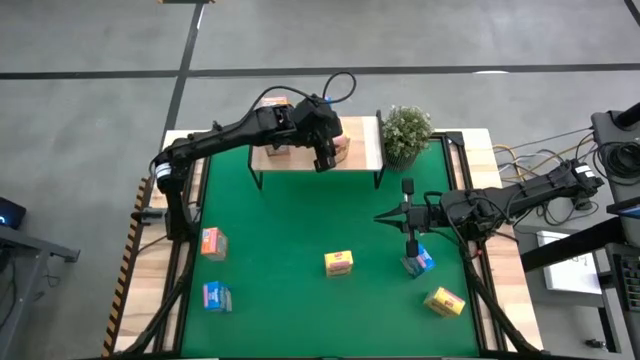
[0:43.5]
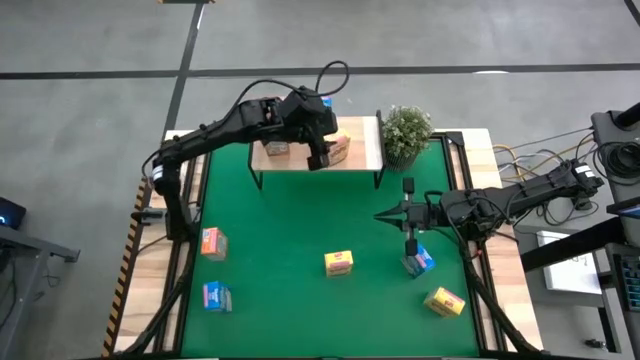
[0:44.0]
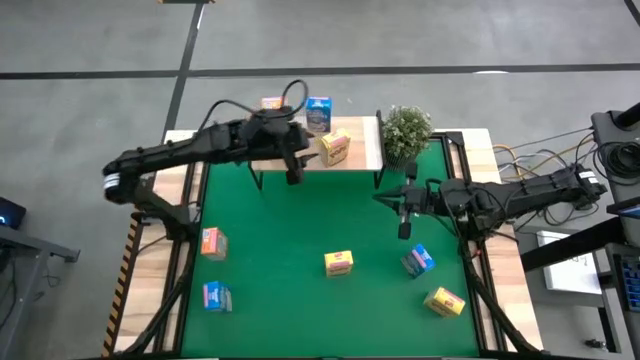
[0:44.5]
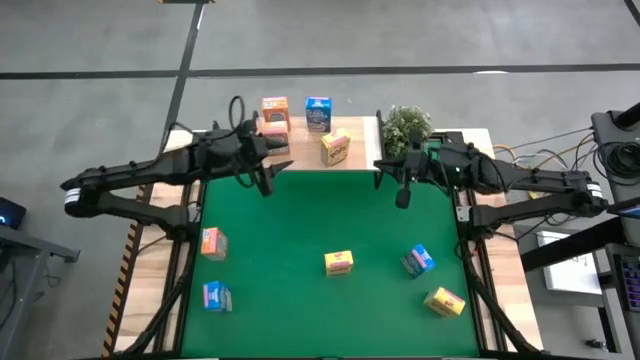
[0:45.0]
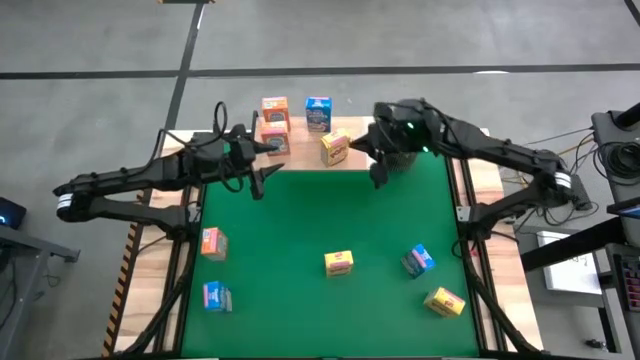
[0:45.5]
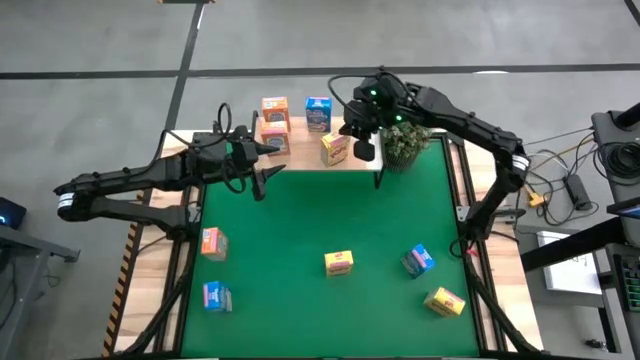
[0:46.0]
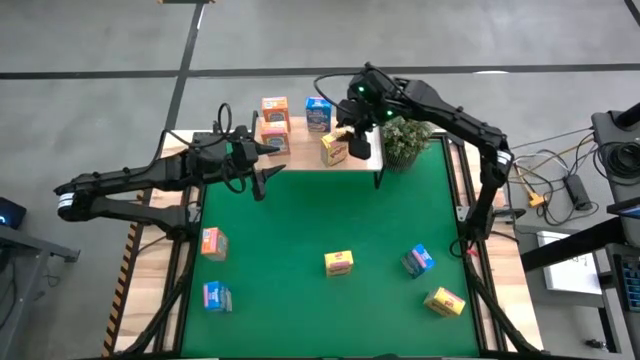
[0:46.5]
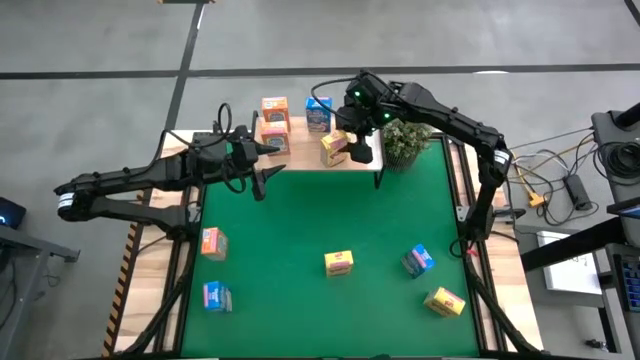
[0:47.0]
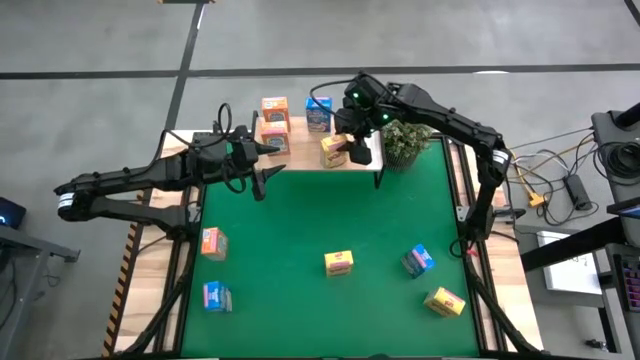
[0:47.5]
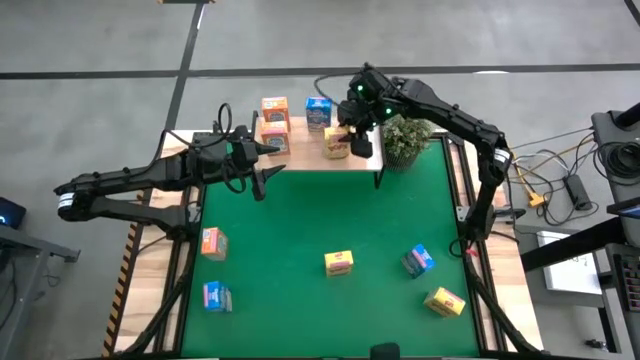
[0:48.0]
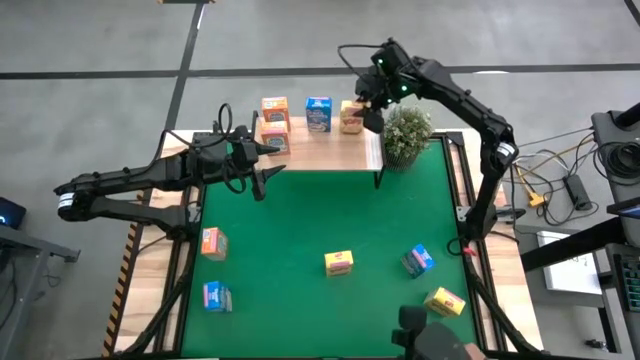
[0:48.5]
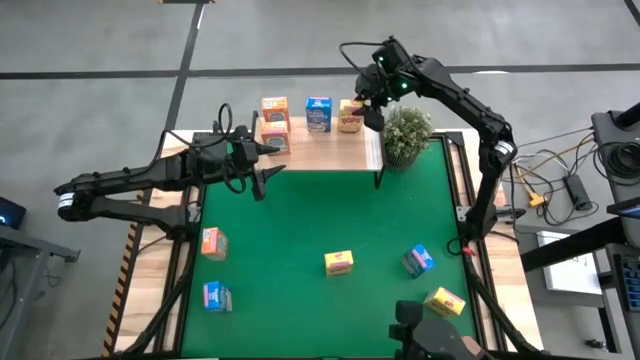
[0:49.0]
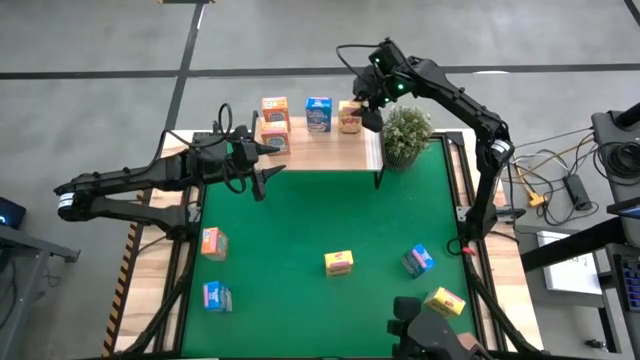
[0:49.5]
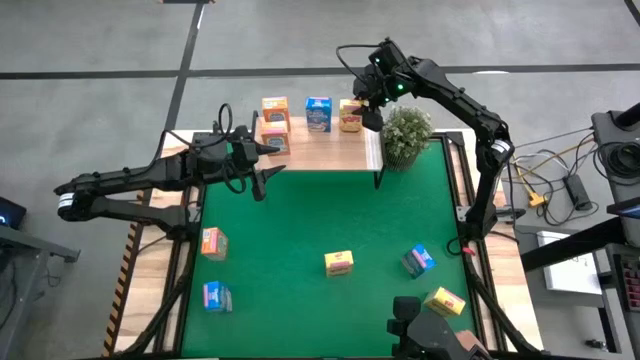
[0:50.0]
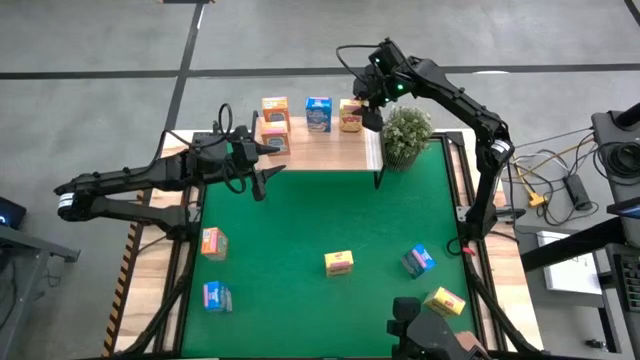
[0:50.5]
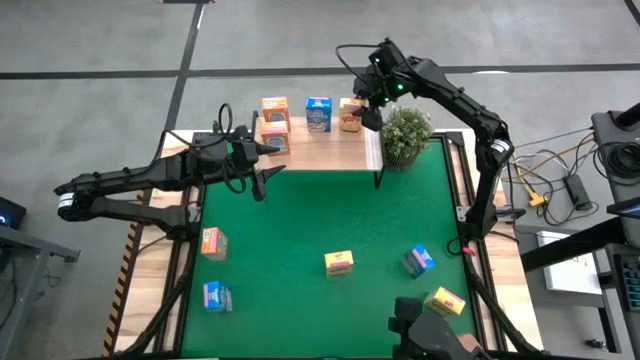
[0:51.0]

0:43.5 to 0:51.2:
Task: Stack cereal on shelf
Adjust the yellow cereal box on the shelf

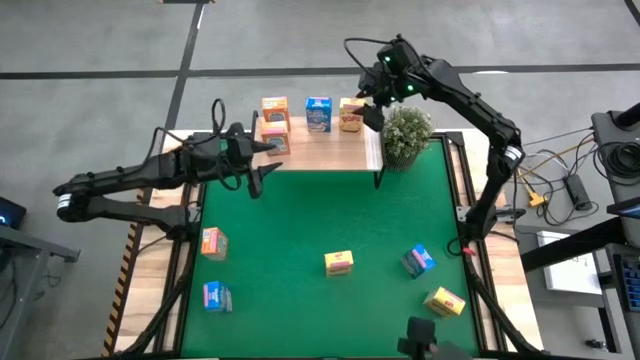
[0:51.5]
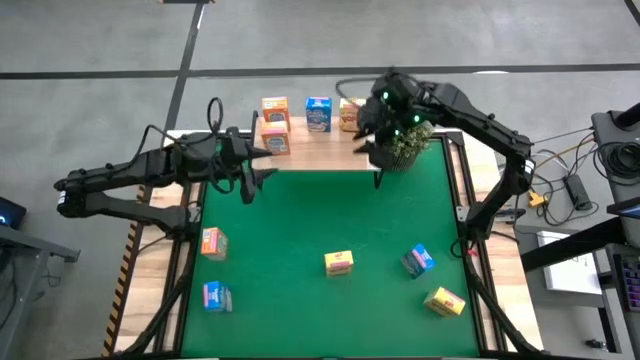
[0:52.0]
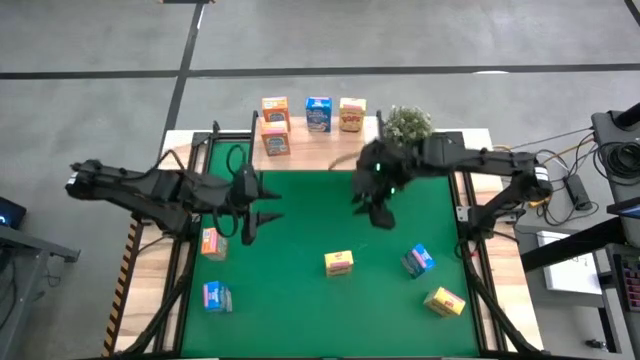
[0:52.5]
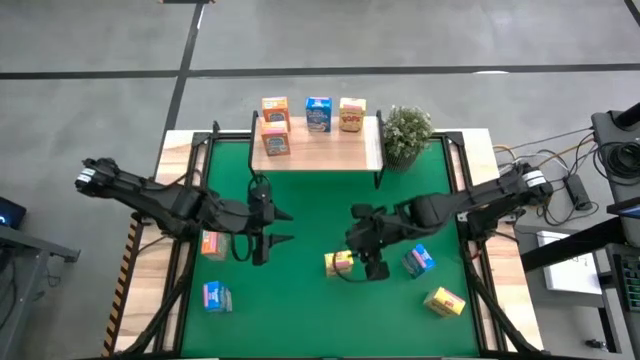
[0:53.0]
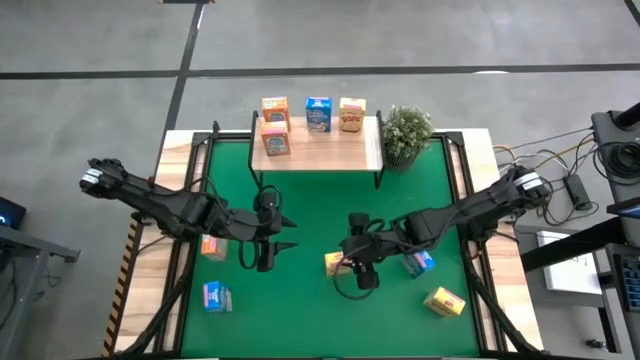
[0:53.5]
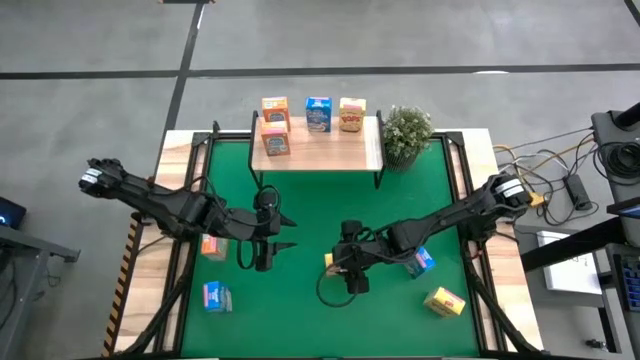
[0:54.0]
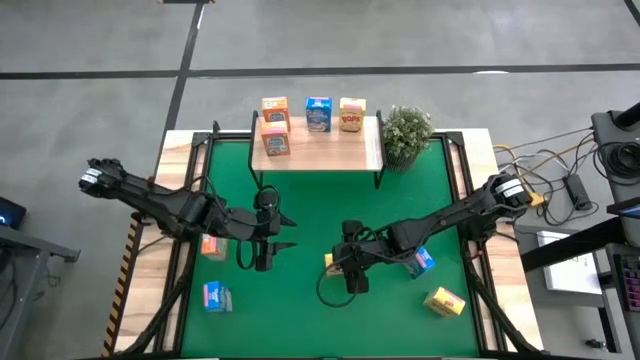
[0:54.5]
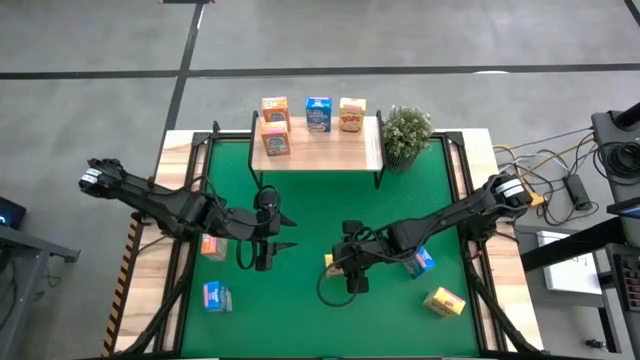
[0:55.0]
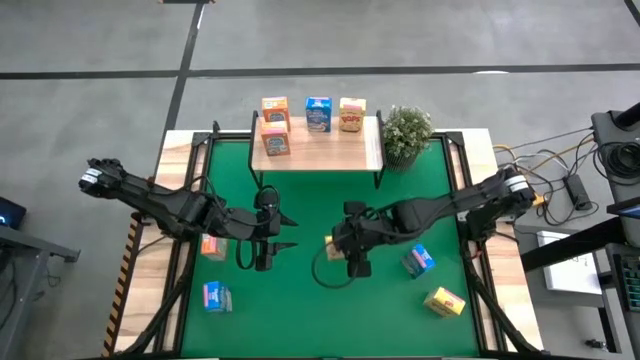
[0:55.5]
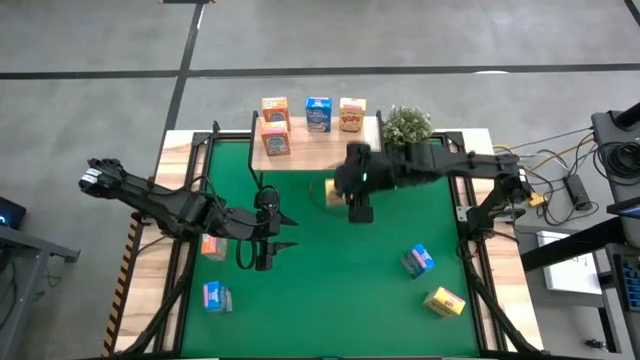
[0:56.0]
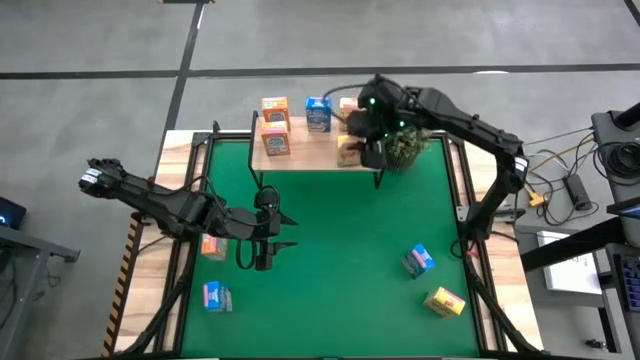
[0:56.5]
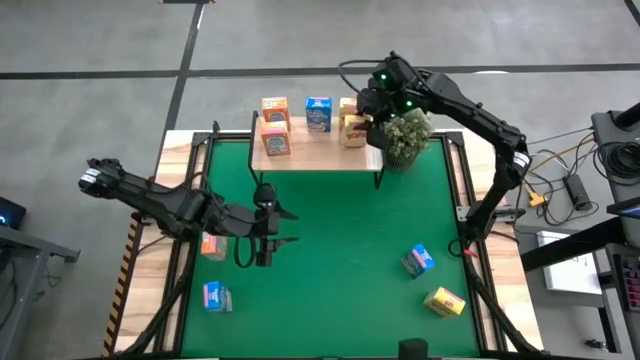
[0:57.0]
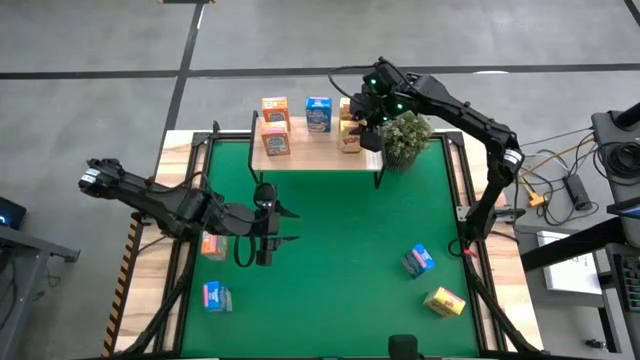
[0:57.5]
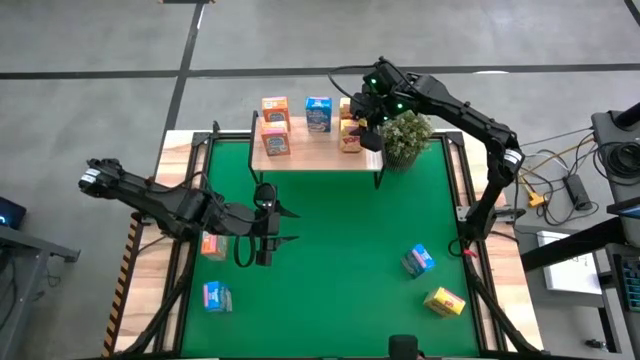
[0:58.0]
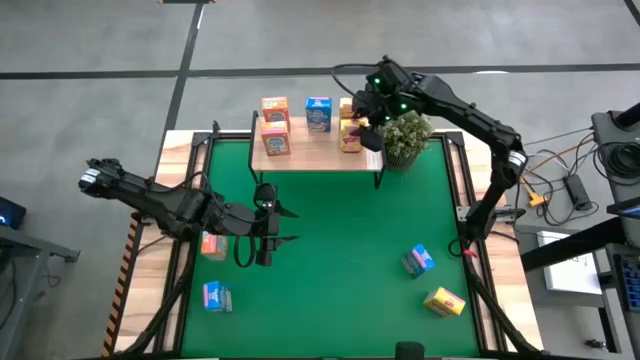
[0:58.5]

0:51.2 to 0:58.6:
Put the left yellow cereal box on the shelf

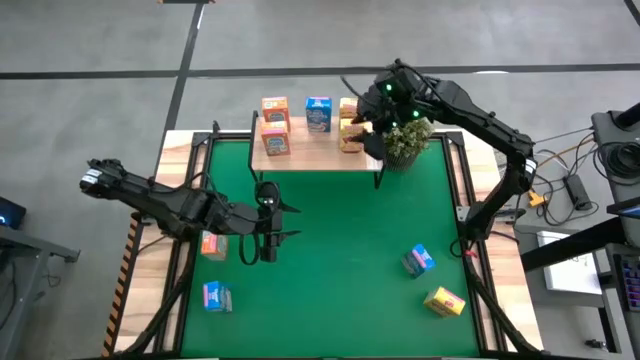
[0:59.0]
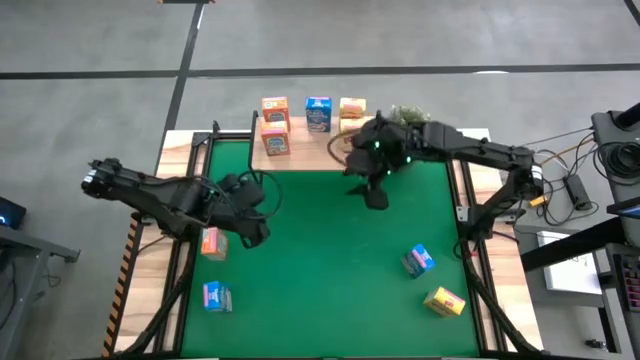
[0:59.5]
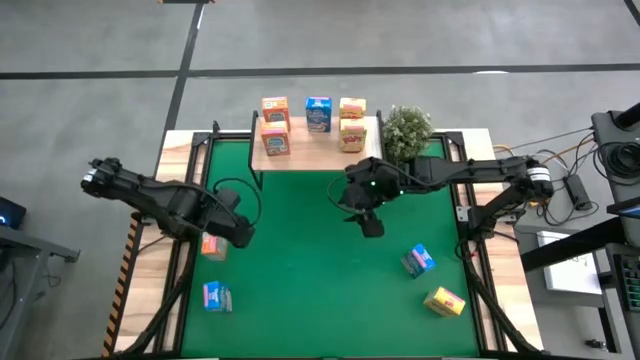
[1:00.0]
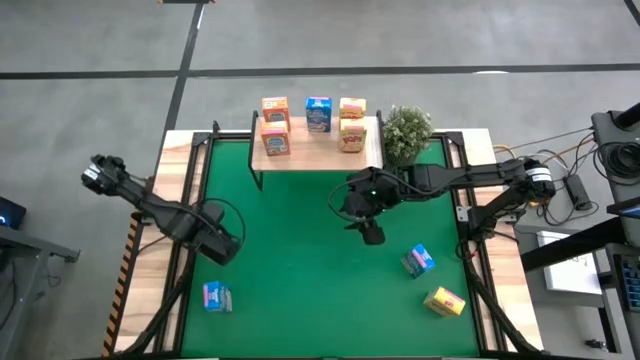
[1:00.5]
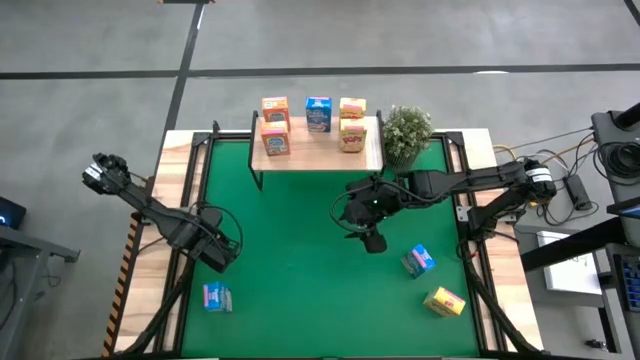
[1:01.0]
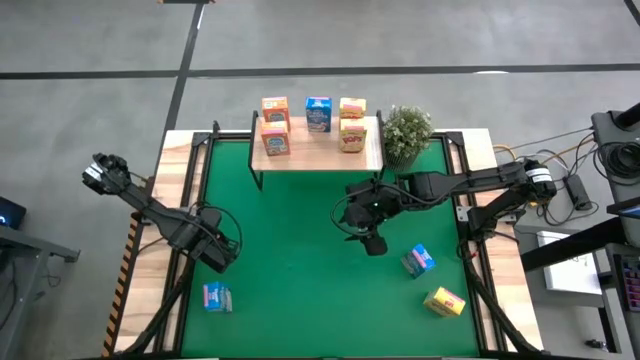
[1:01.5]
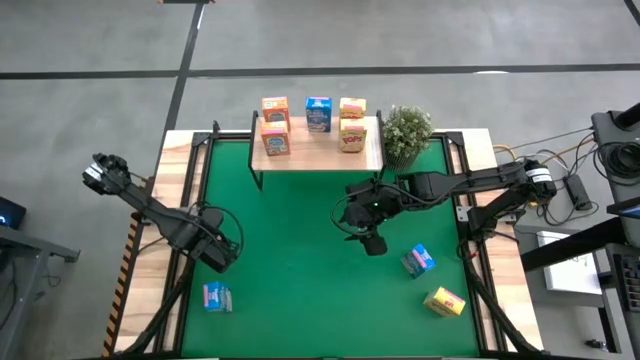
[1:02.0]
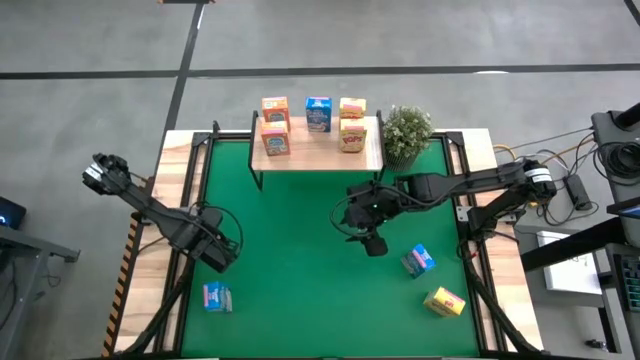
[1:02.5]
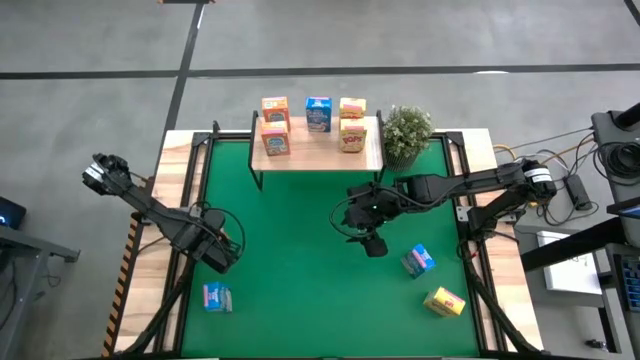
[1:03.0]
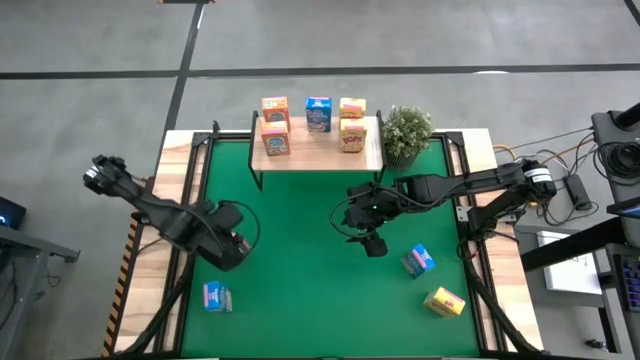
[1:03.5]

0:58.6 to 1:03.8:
Put the orange cereal box on the shelf

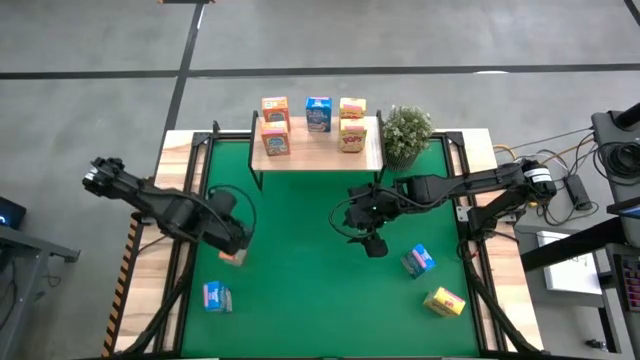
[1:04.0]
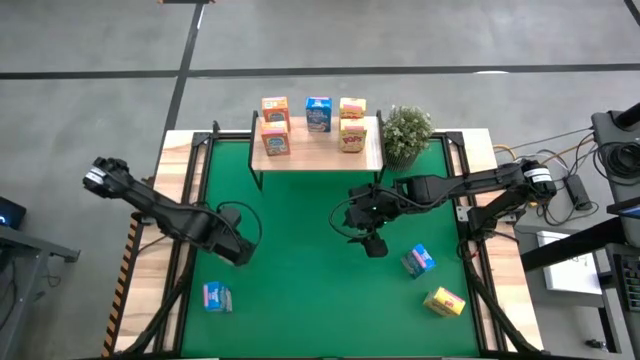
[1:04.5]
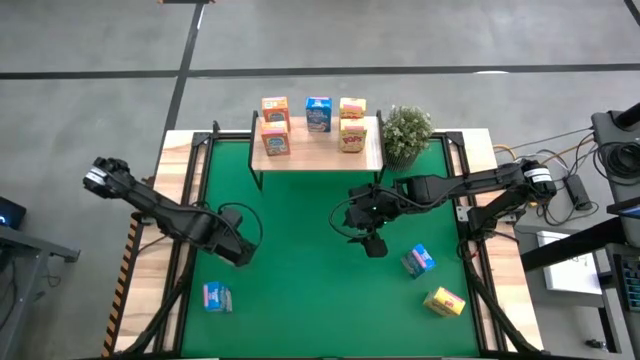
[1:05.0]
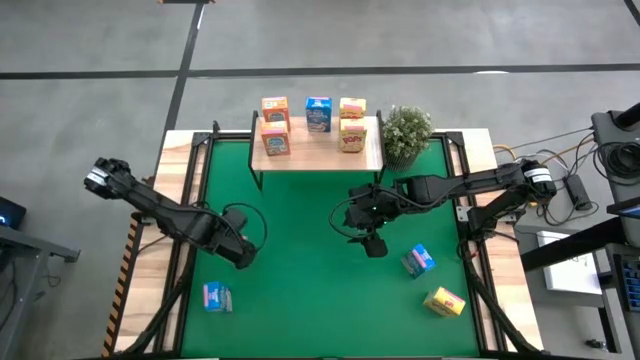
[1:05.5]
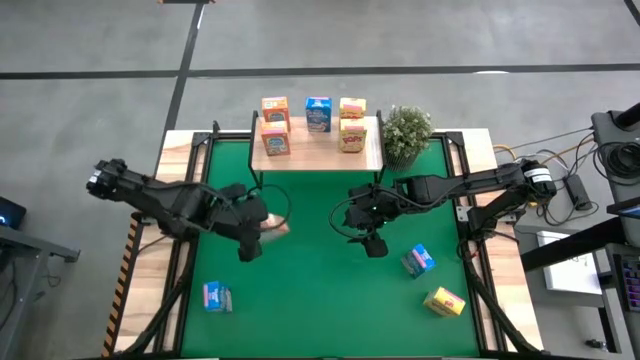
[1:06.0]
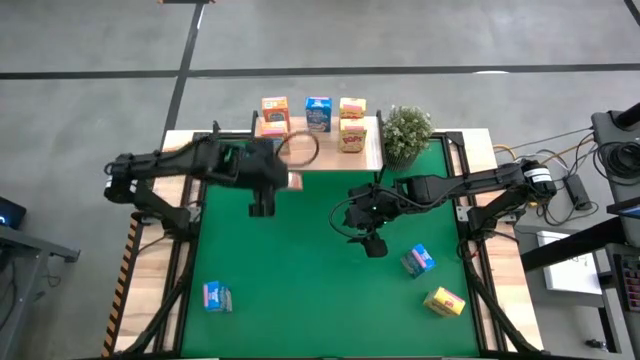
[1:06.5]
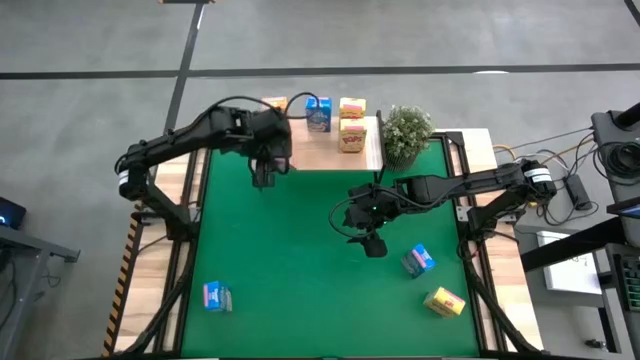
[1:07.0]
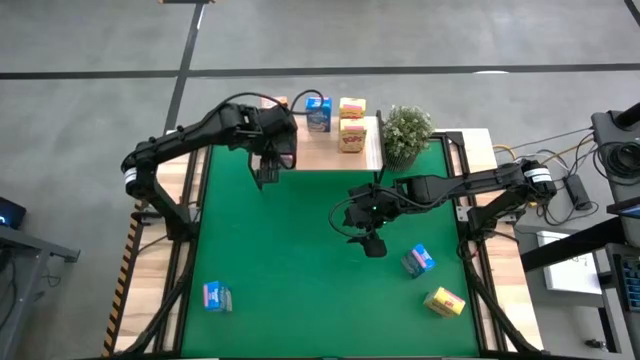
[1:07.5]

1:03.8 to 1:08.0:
Put the orange cereal box on the shelf
